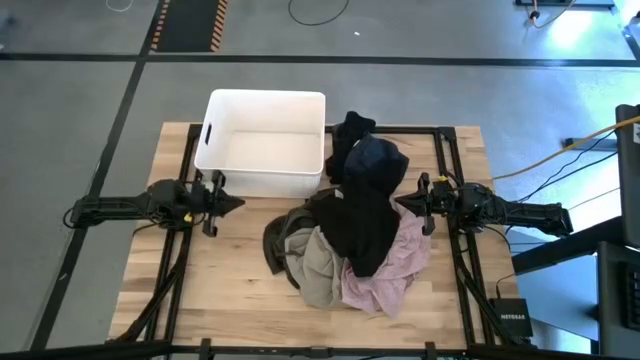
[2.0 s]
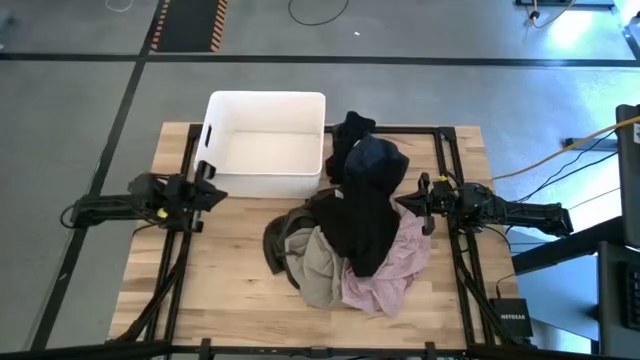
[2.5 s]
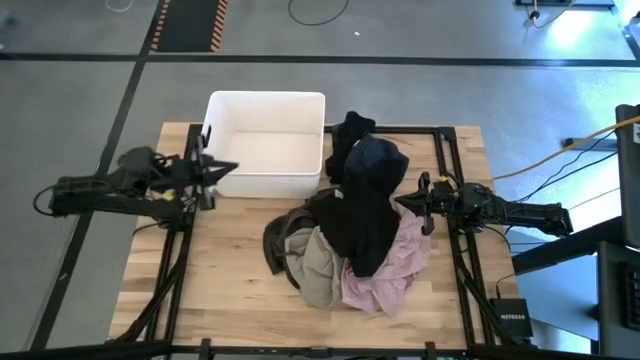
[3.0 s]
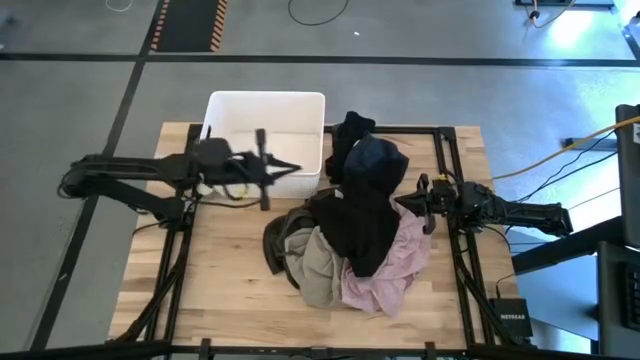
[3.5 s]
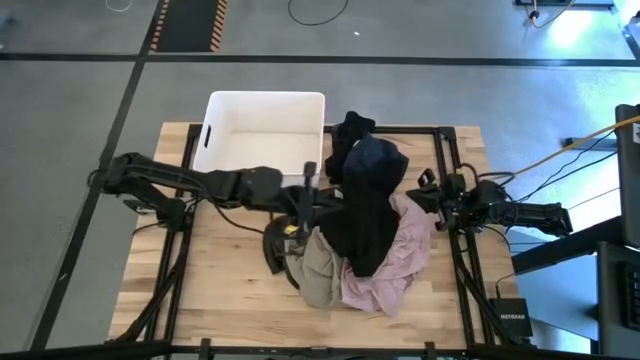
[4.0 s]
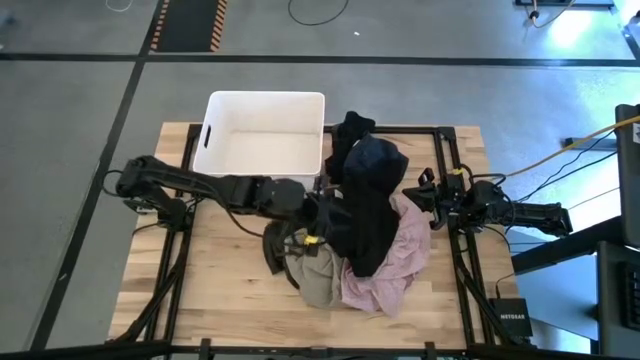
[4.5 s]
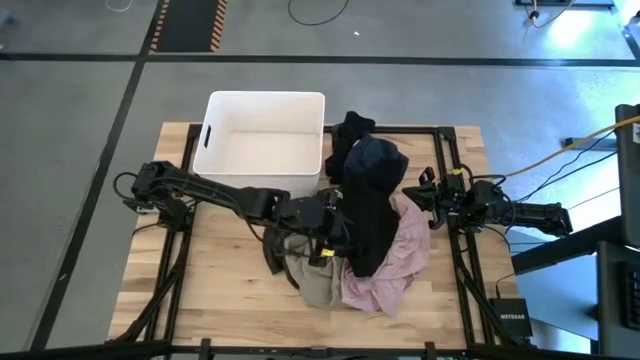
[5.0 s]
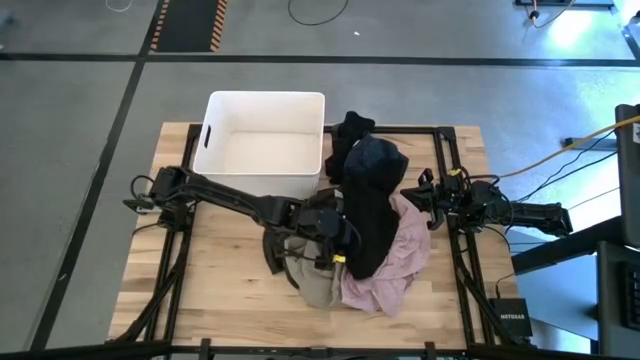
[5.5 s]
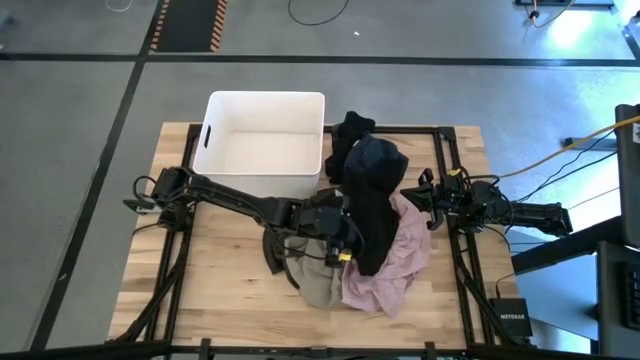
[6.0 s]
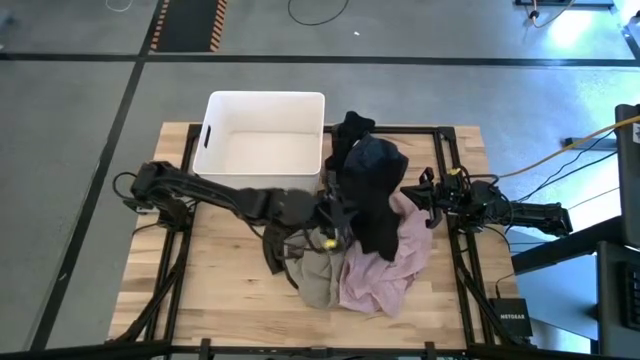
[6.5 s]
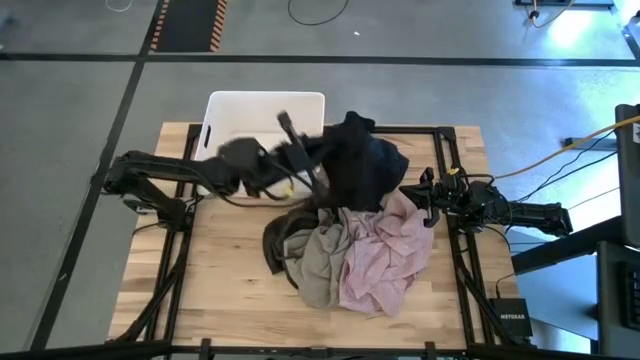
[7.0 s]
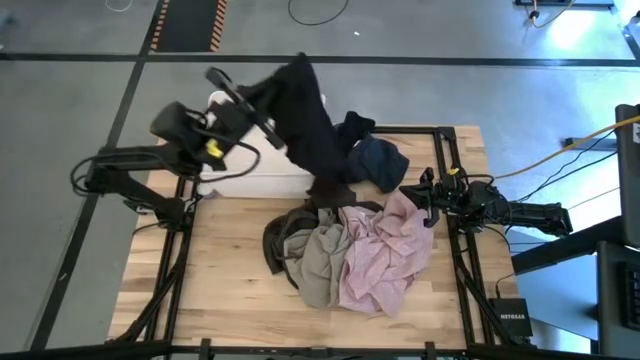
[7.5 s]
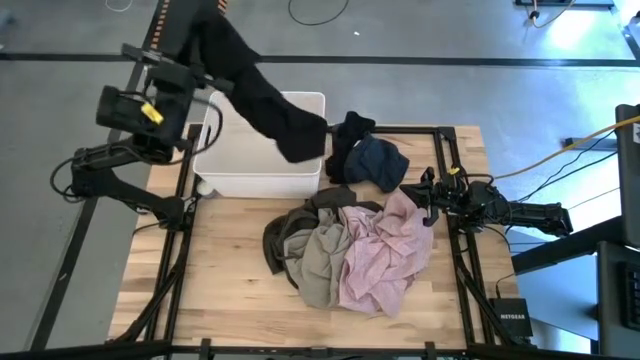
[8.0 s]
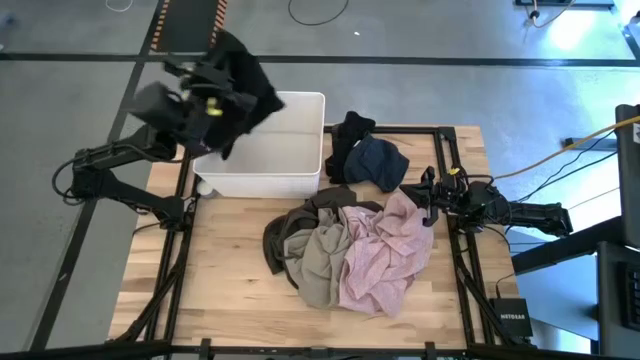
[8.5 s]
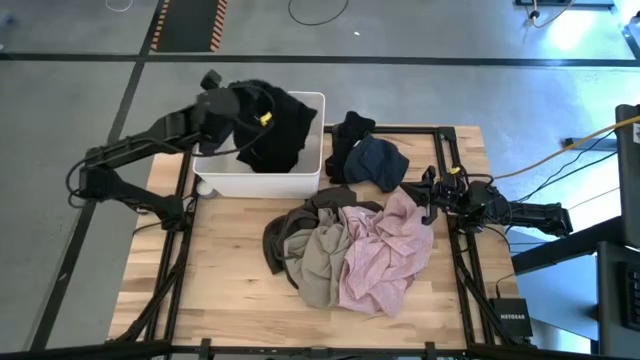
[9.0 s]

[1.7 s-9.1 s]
Task: Sort clothes
Put the black shirt into the bin

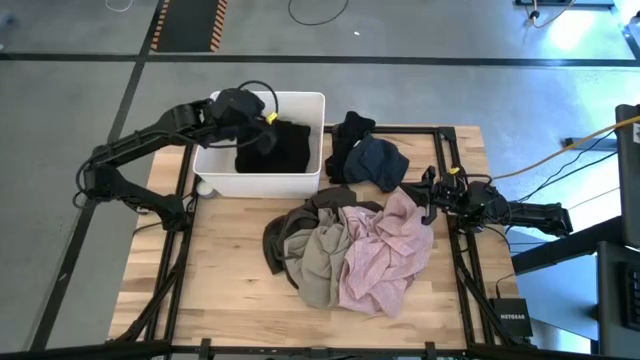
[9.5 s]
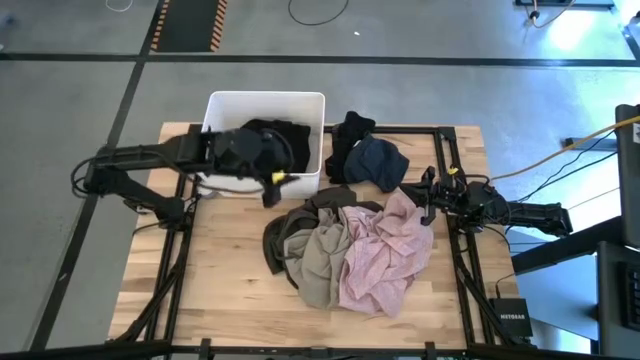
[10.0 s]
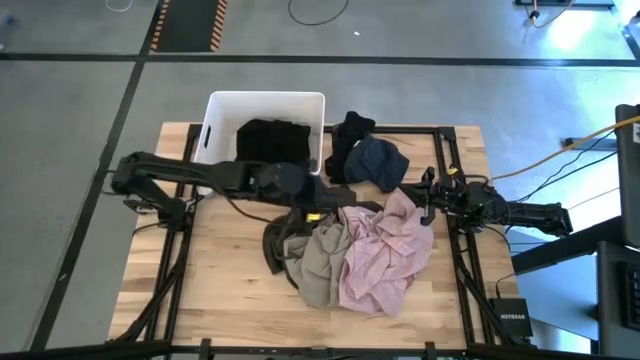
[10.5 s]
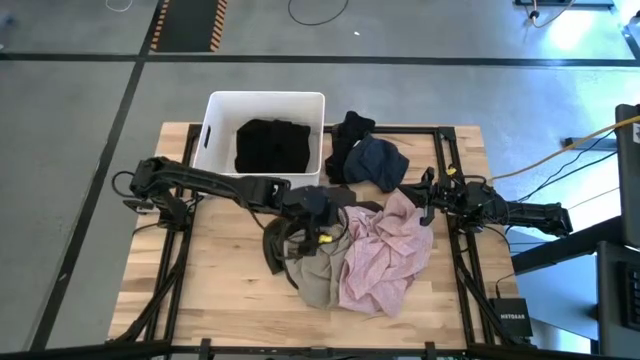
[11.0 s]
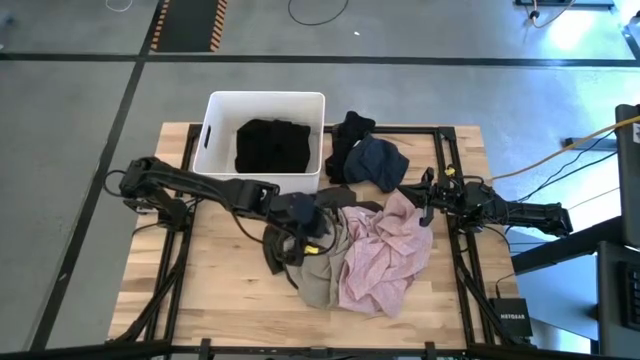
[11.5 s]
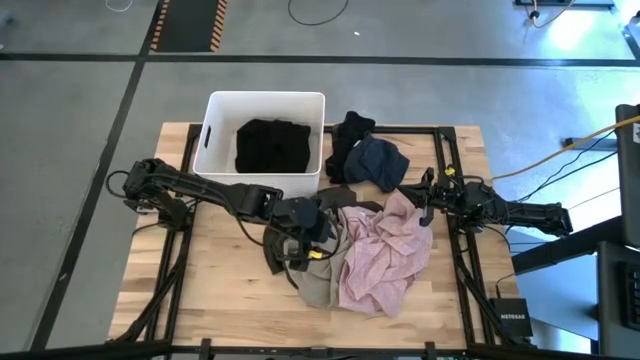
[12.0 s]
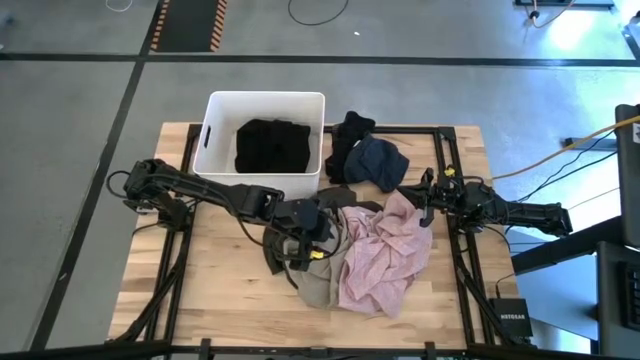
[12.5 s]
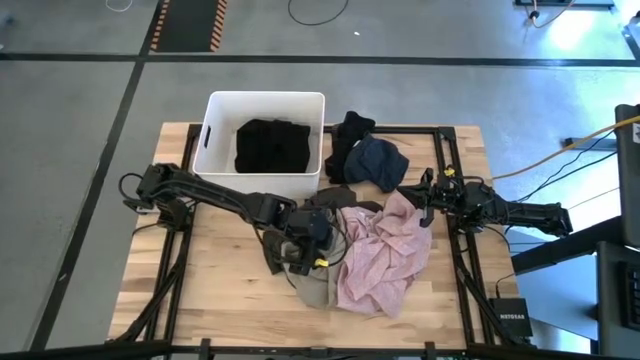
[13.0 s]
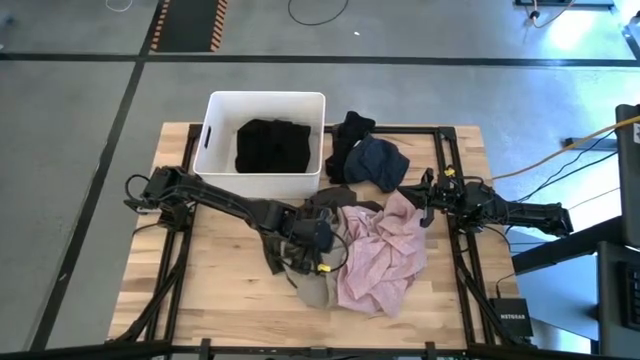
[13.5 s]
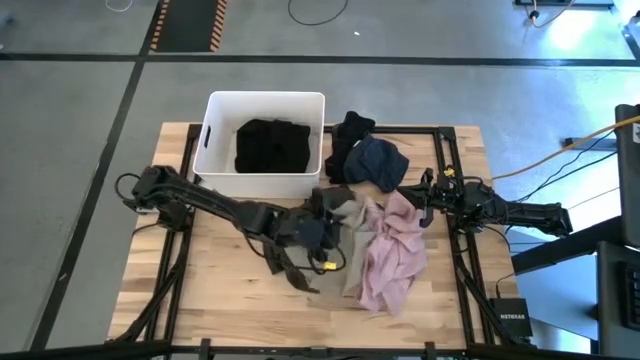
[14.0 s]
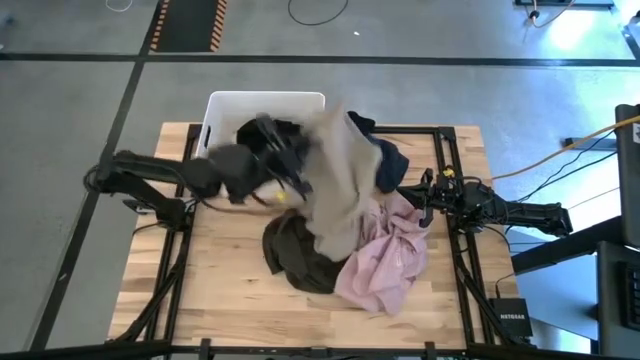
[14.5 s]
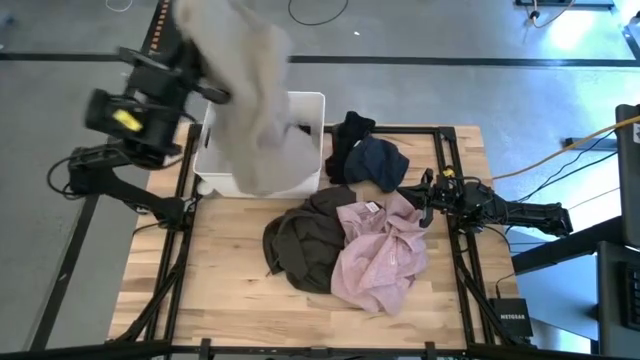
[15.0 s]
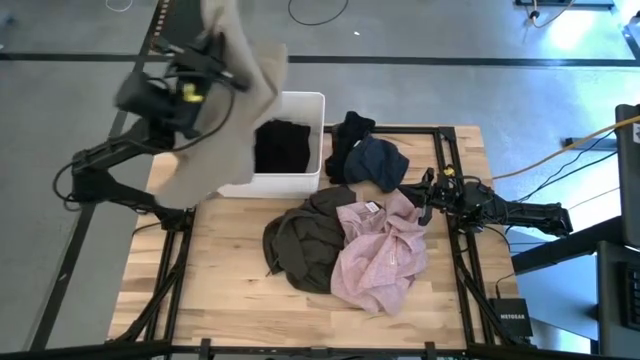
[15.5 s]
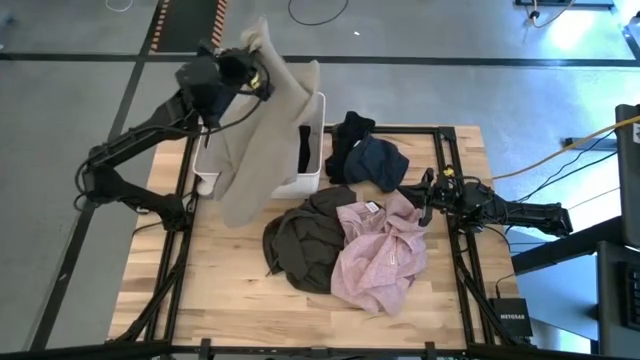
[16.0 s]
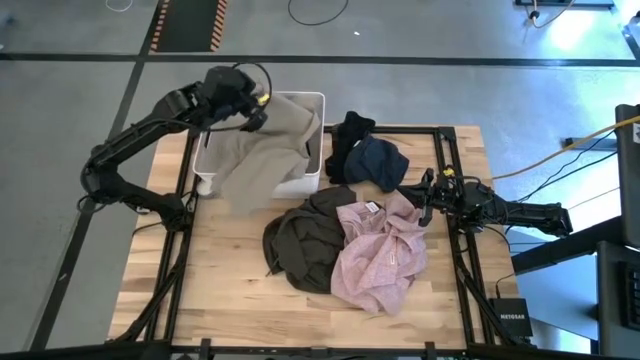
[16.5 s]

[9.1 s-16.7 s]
Put the light green shirt into the bin

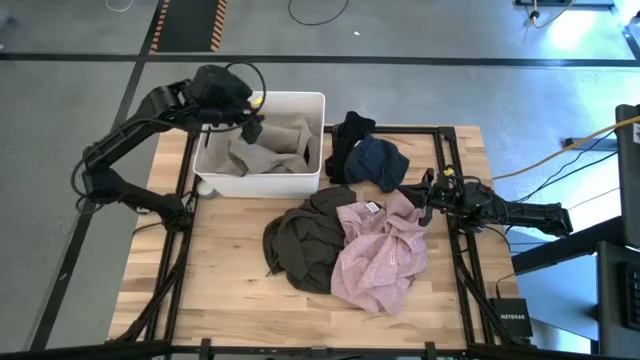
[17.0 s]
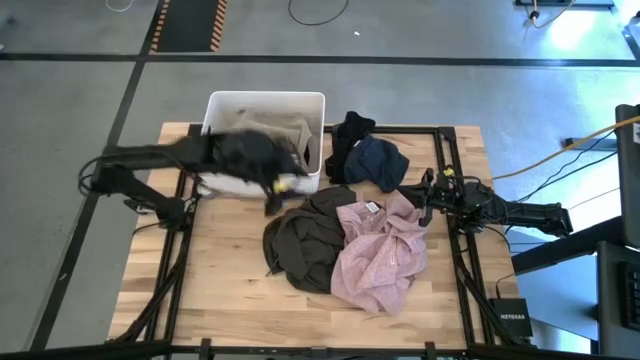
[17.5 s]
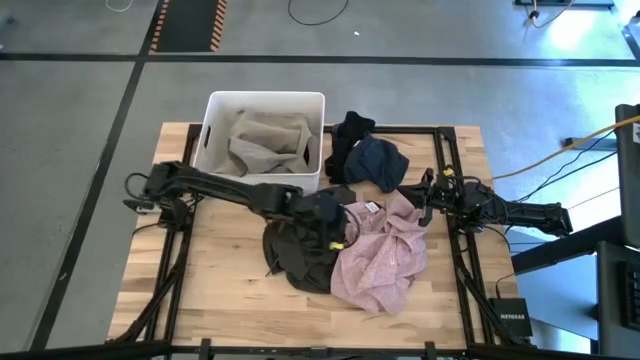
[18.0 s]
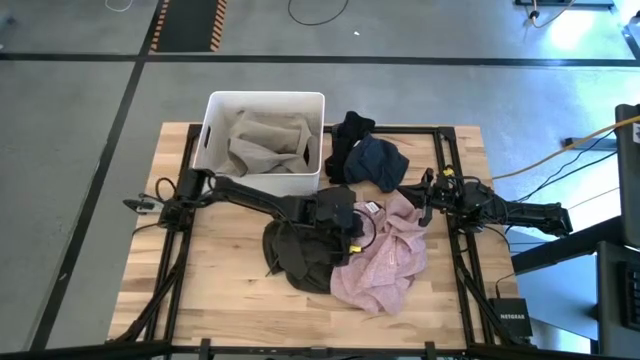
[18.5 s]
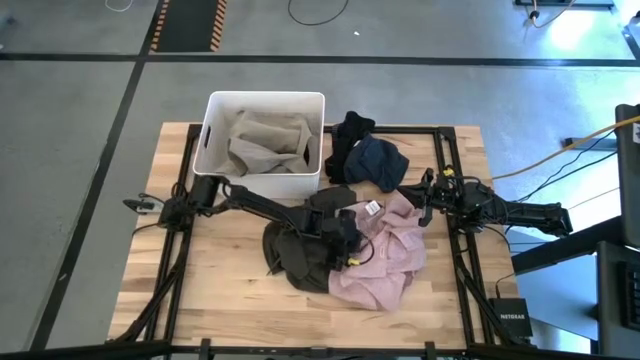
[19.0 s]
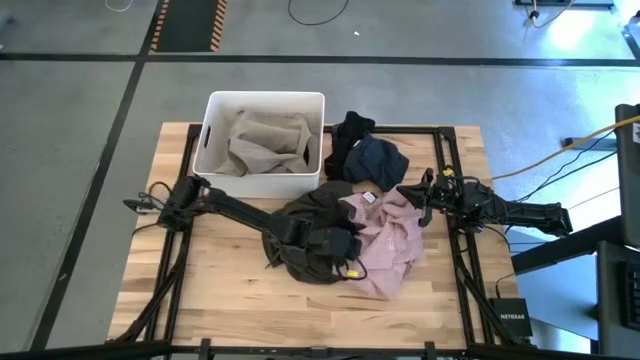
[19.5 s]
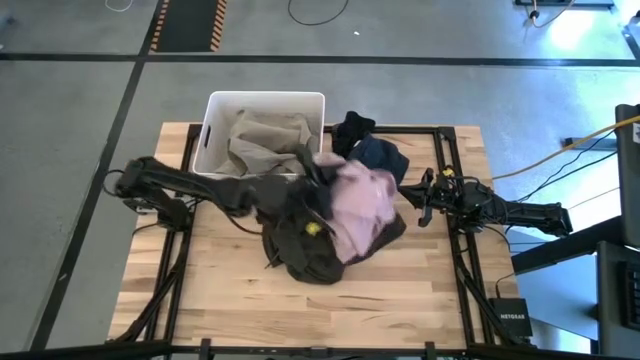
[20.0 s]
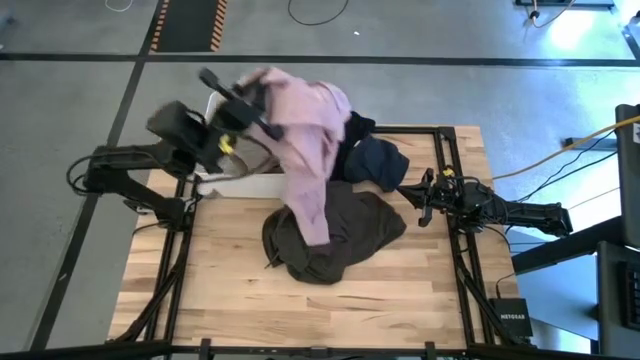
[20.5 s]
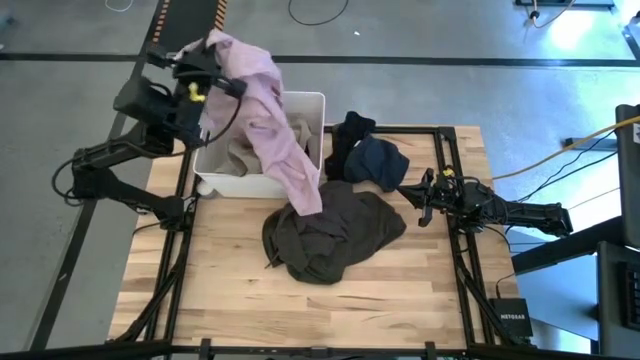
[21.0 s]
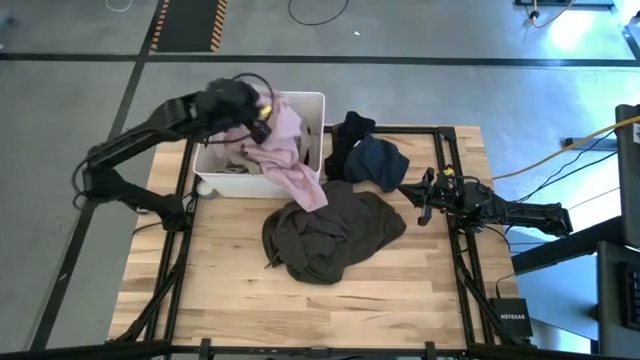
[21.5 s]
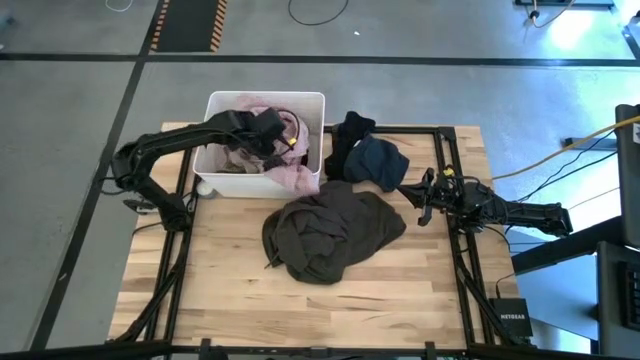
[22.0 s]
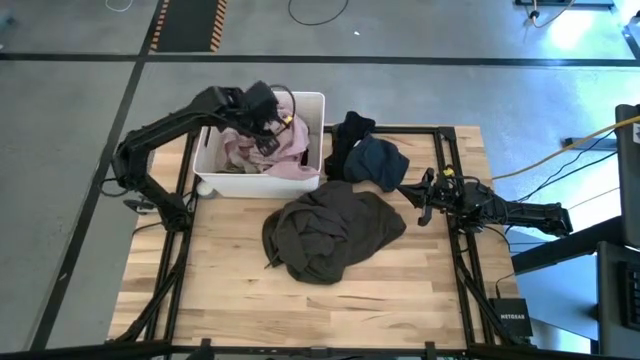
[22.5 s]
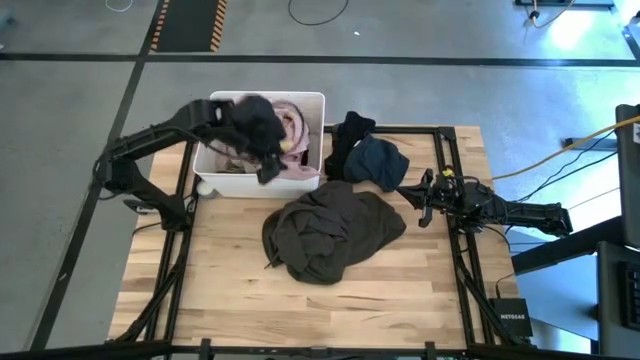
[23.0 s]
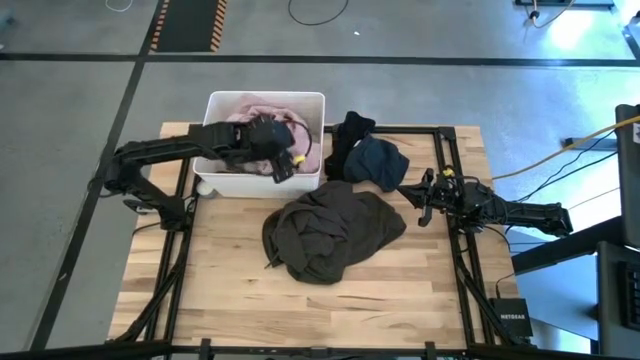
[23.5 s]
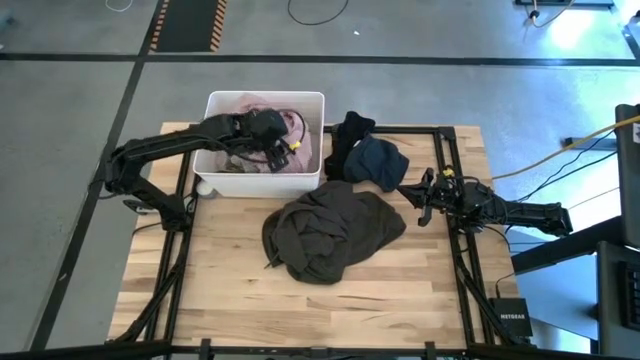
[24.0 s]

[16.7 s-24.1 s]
Put the pink shirt into the bin
